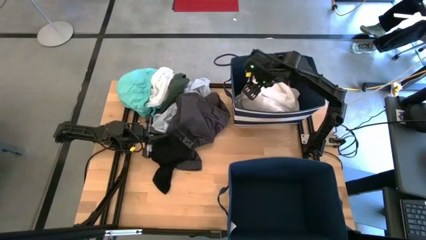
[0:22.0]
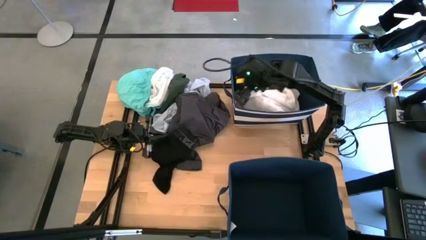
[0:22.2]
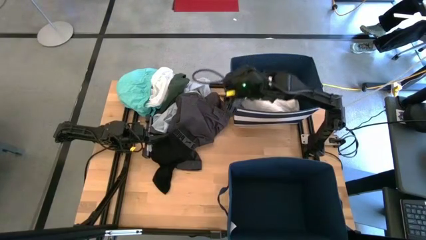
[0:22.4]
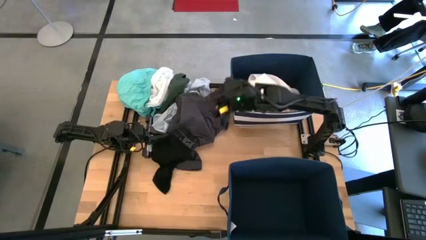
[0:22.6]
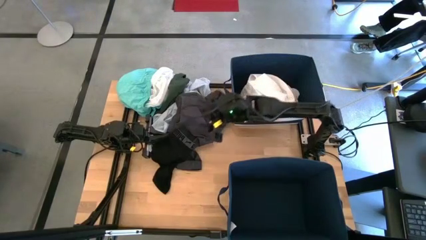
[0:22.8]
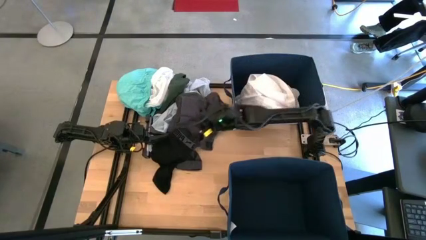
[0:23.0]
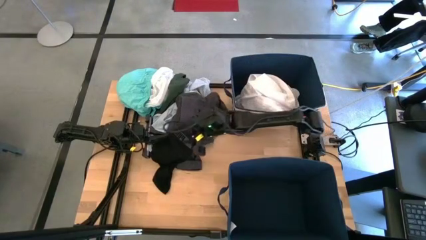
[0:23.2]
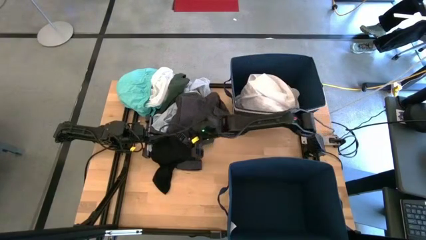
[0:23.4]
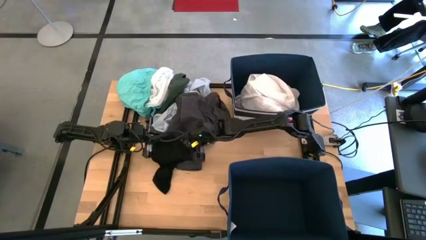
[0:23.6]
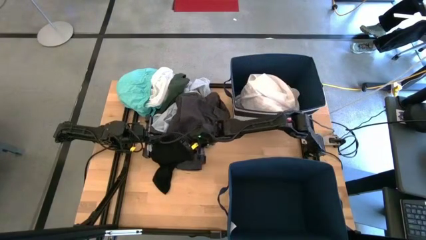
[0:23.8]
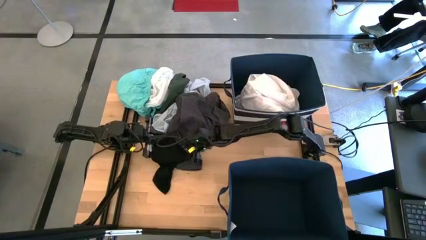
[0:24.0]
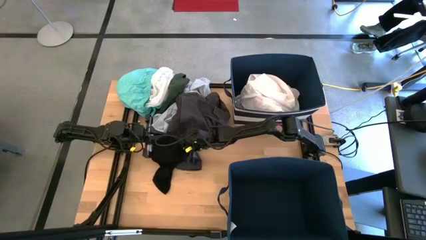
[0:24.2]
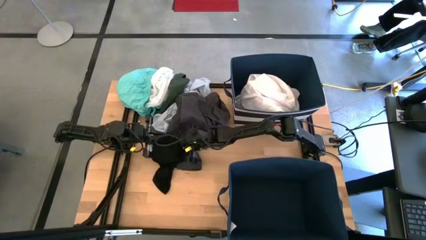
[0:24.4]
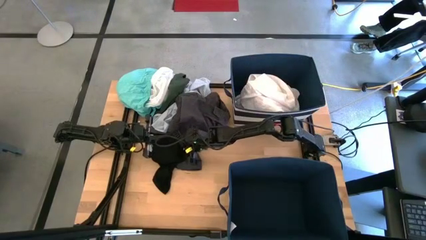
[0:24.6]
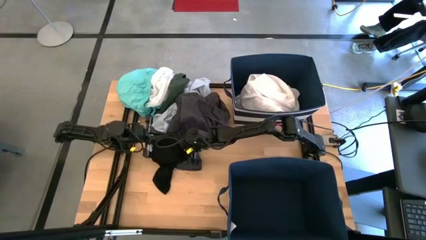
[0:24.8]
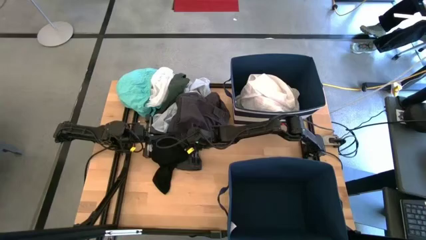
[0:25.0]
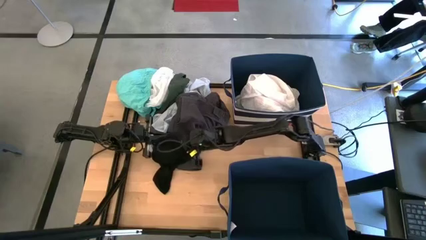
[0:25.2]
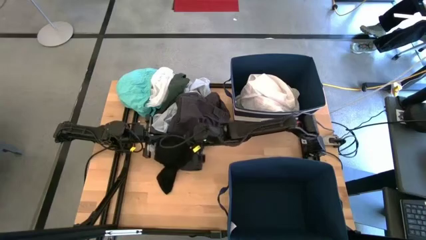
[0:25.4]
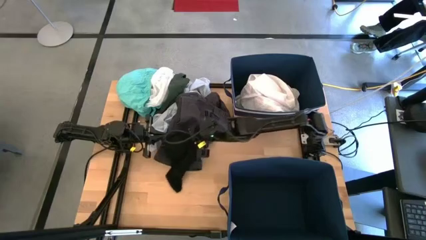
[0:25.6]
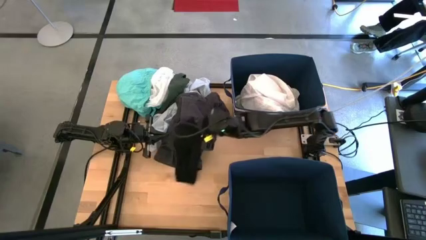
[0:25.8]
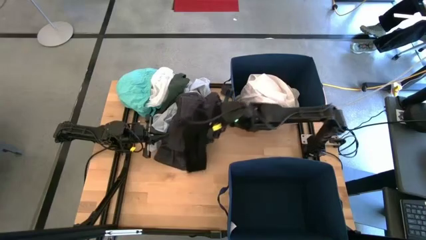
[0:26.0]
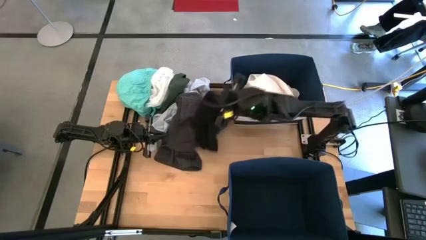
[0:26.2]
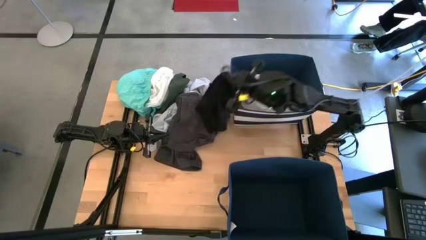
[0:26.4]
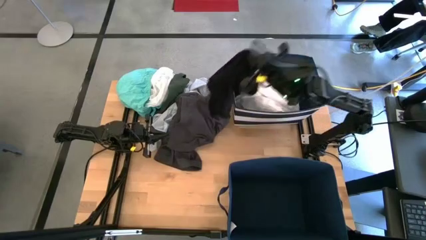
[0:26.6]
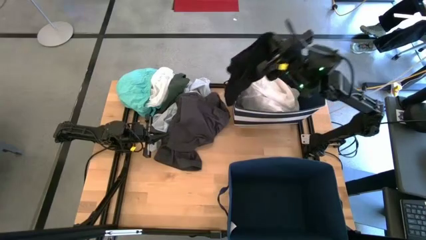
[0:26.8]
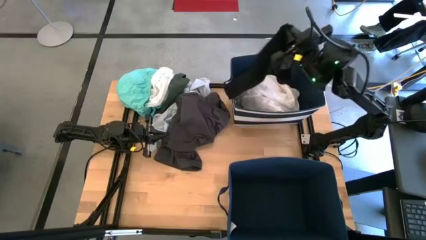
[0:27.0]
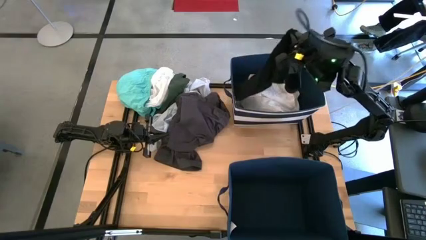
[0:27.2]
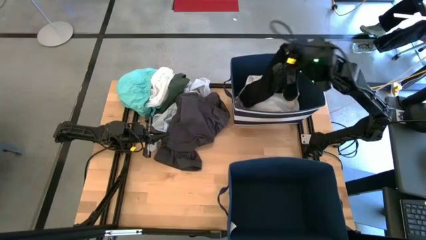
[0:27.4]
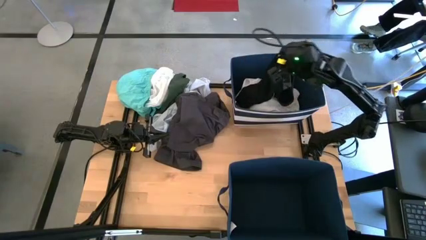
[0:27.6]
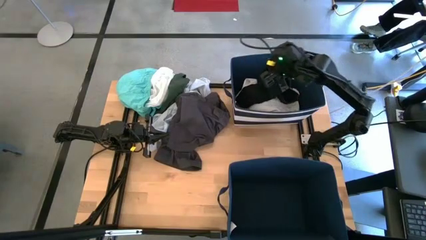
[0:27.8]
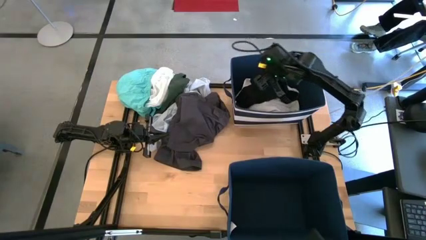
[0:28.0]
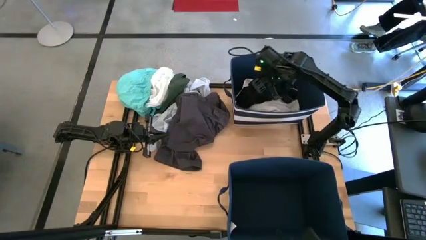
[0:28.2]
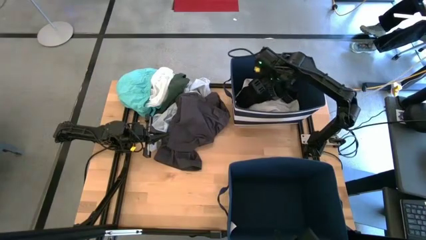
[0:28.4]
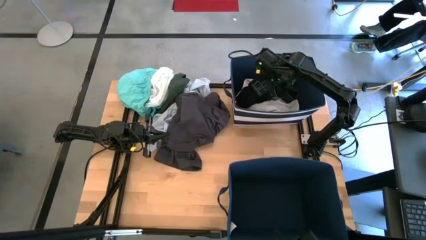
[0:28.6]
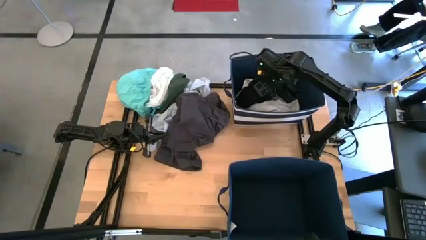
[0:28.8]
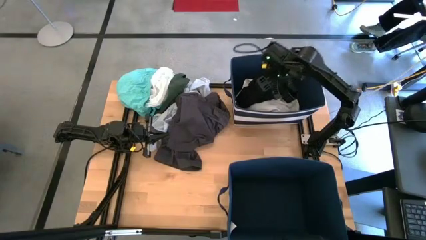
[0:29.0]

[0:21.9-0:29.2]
Task: Sort clothes
Put the black boxer into the top blue laundry organizer

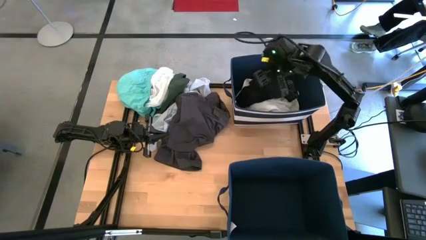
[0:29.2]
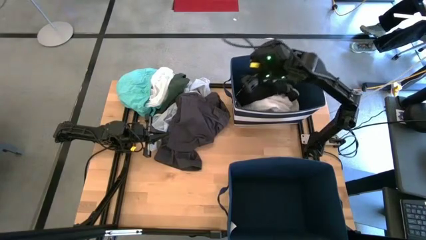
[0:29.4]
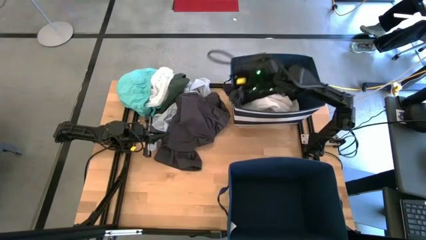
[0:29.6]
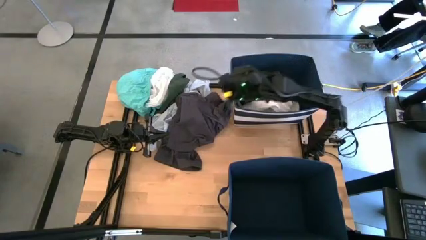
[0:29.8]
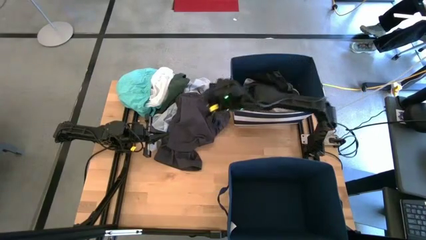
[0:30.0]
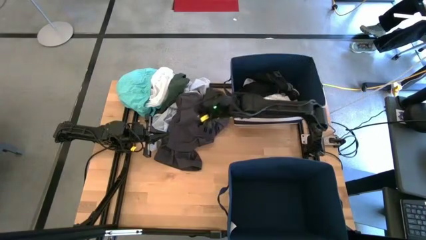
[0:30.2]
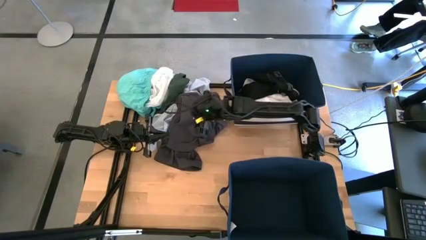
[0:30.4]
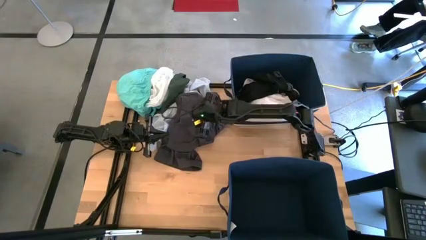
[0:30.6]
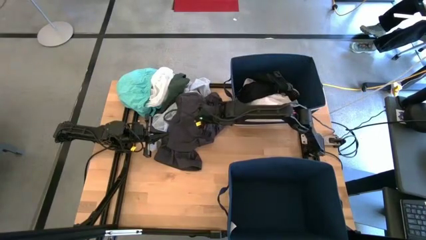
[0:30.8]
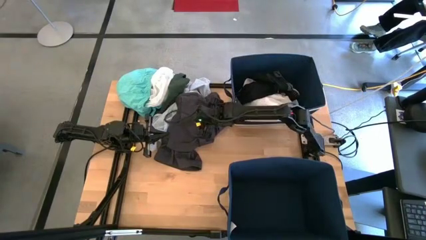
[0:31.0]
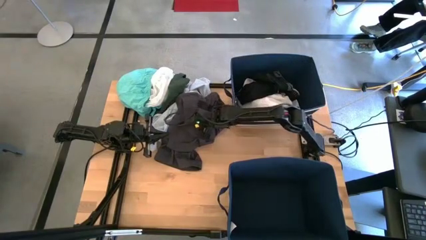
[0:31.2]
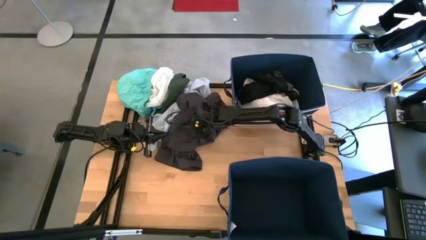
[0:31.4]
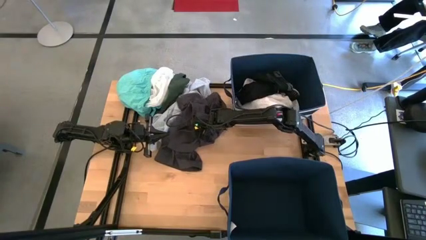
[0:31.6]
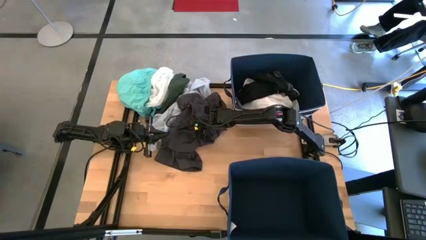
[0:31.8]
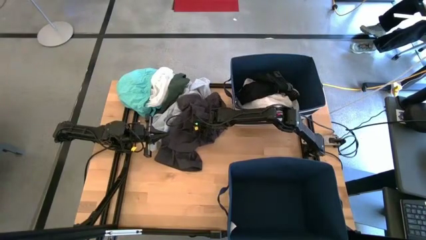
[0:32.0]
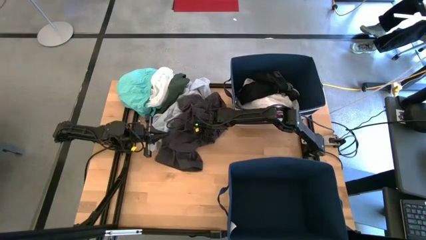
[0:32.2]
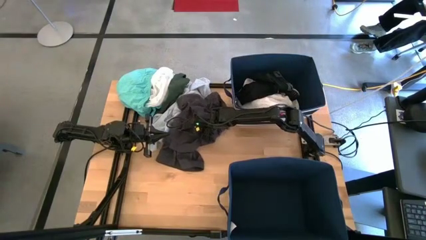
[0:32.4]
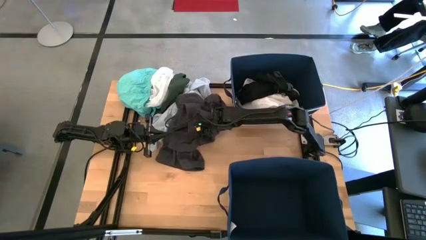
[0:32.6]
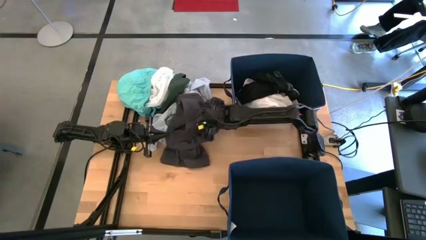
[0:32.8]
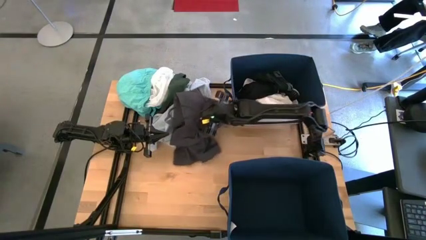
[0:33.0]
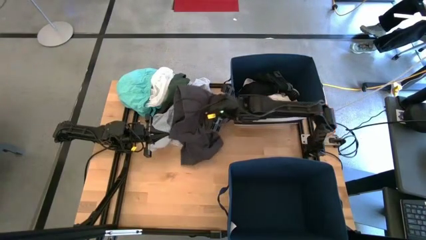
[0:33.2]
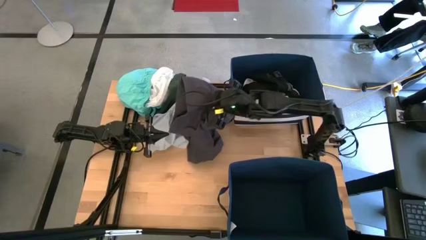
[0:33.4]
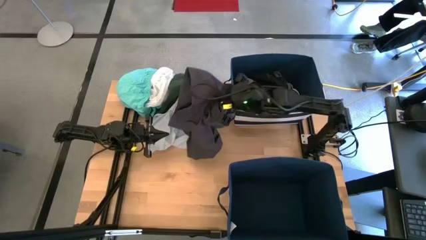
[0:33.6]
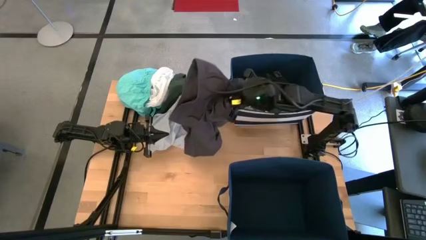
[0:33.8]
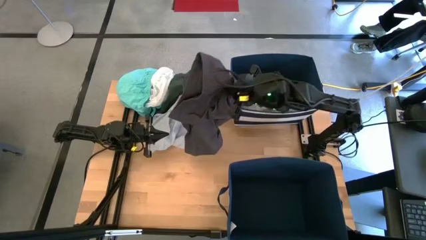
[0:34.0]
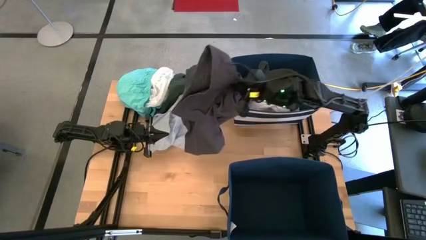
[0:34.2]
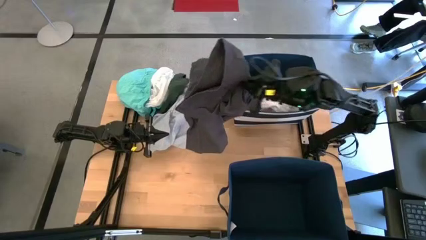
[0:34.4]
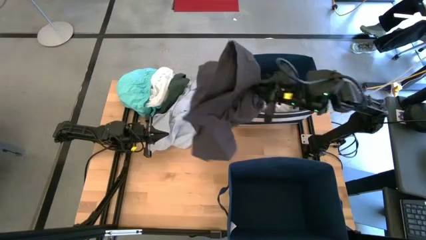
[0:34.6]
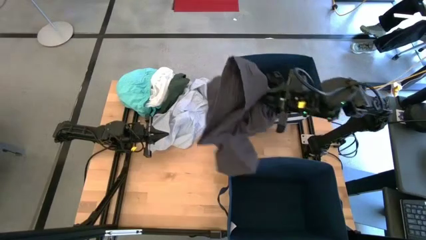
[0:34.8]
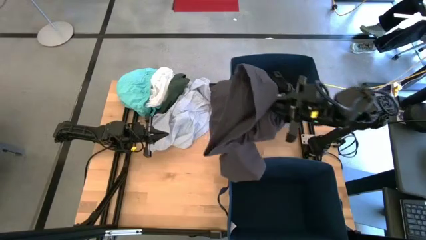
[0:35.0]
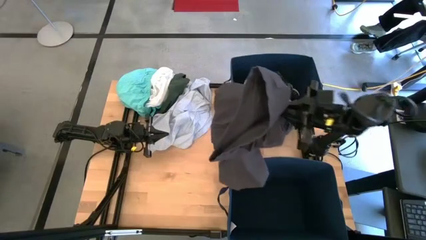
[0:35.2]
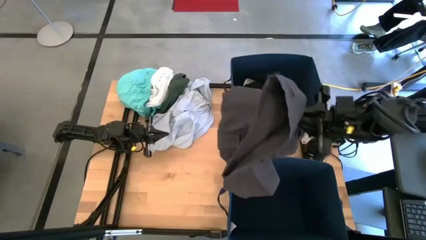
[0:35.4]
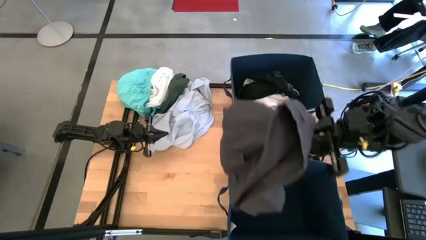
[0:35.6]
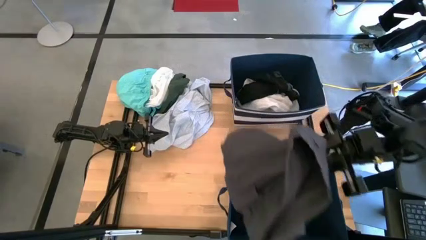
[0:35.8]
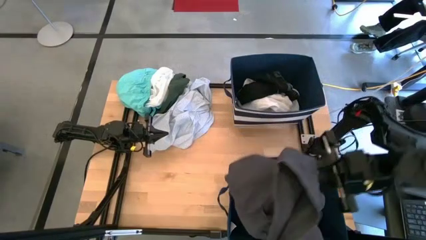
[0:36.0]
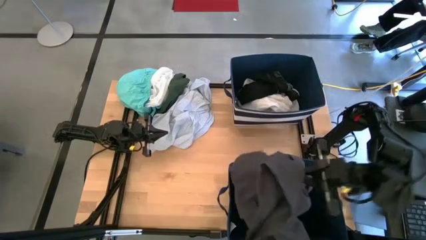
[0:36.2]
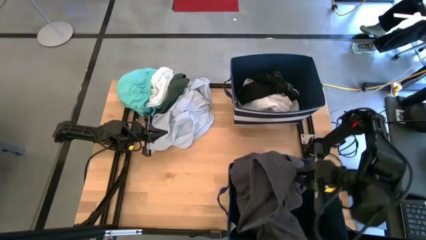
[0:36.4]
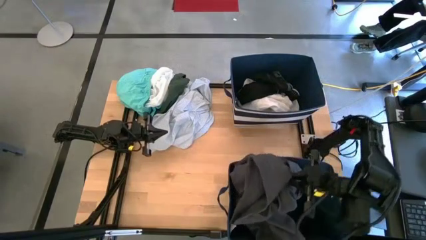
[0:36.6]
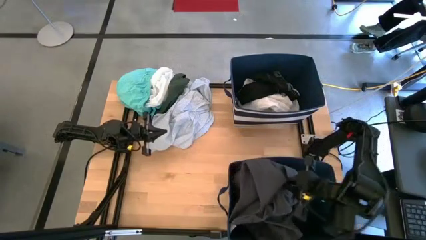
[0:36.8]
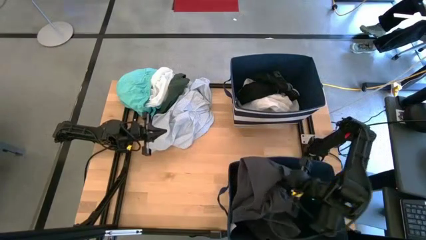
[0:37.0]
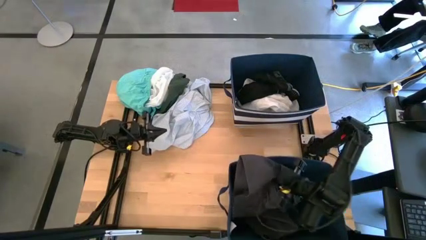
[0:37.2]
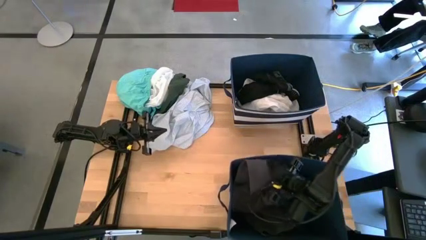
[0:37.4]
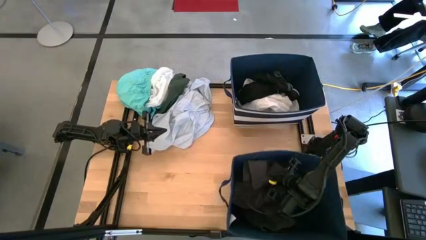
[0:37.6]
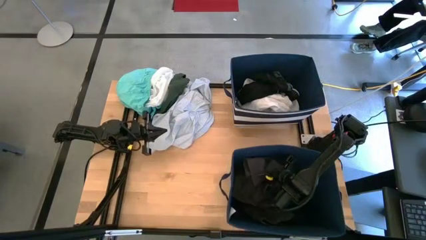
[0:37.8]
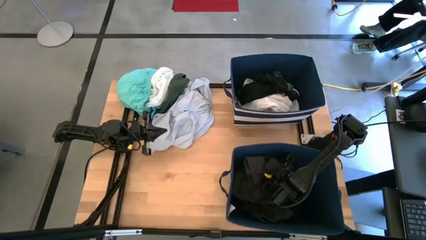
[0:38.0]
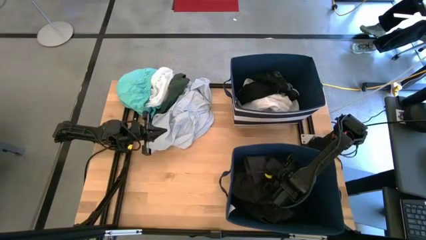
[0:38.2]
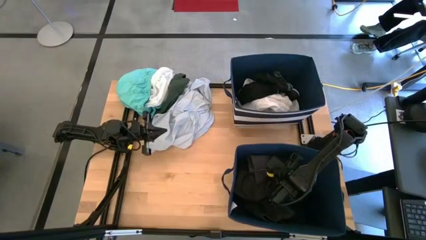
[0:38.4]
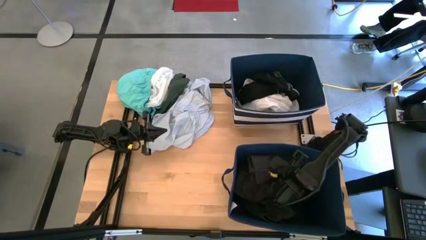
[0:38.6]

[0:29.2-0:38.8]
Put the gray pants into the bottom blue laundry organizer
